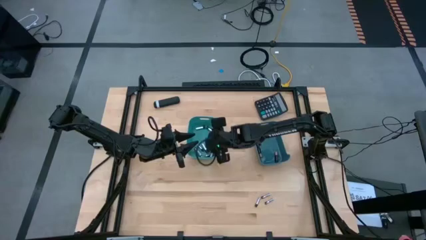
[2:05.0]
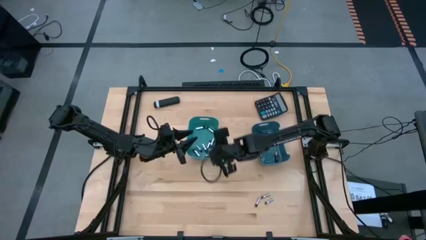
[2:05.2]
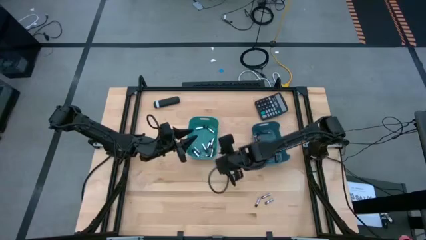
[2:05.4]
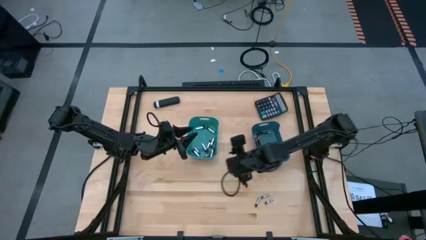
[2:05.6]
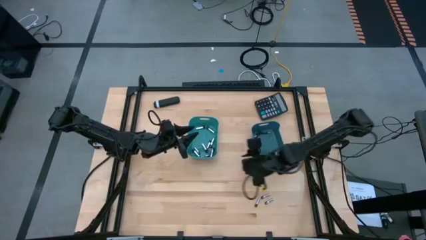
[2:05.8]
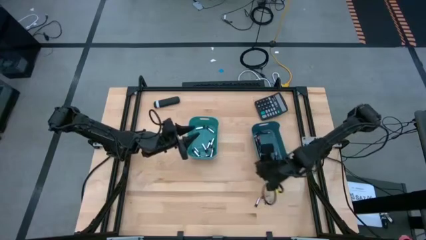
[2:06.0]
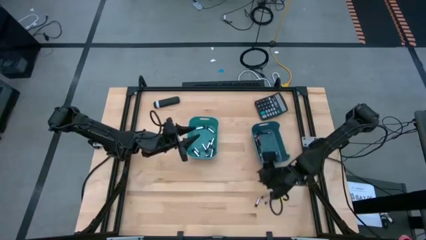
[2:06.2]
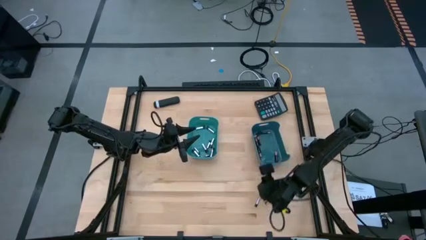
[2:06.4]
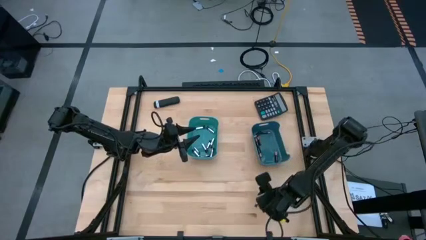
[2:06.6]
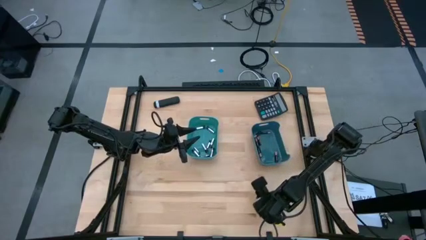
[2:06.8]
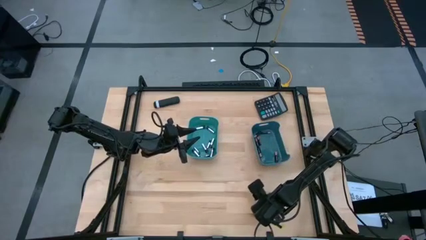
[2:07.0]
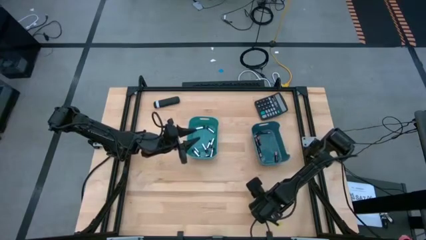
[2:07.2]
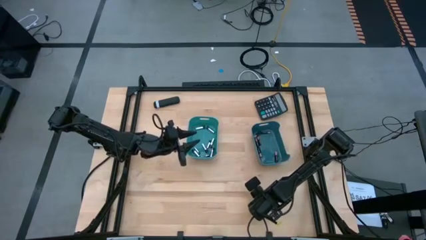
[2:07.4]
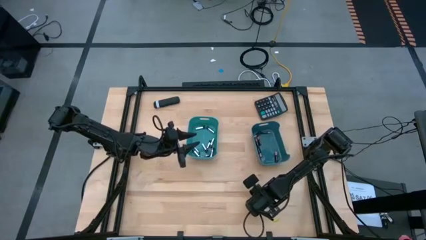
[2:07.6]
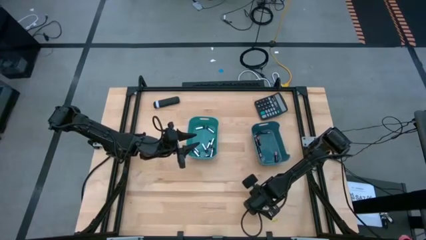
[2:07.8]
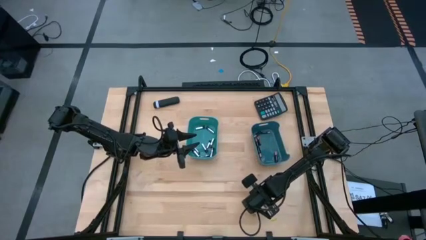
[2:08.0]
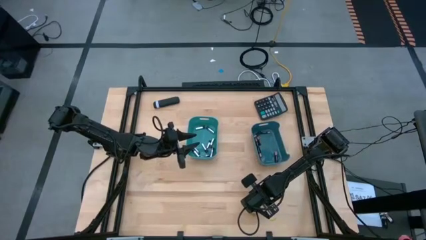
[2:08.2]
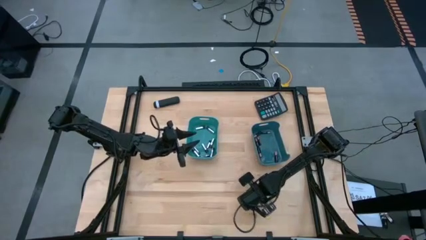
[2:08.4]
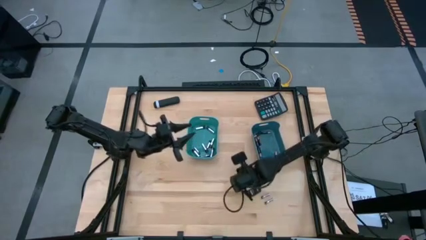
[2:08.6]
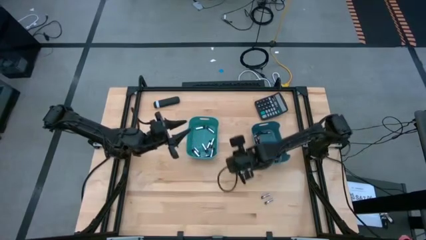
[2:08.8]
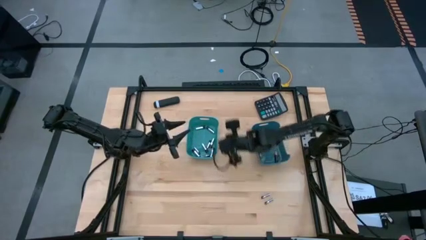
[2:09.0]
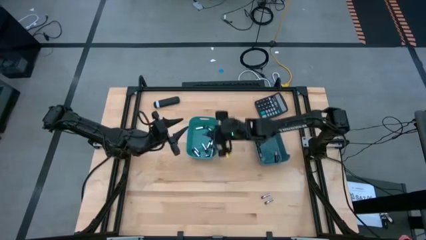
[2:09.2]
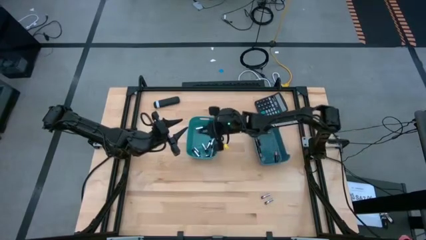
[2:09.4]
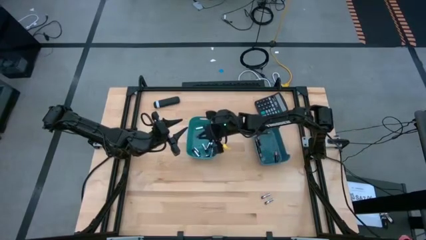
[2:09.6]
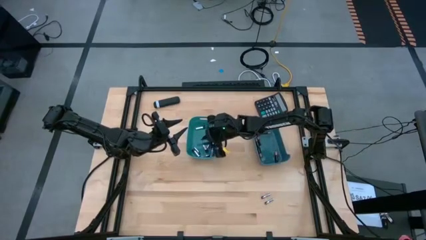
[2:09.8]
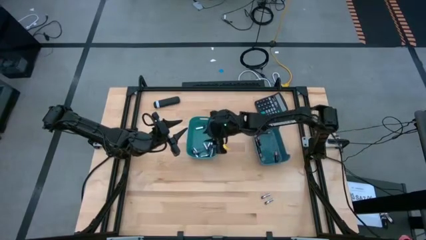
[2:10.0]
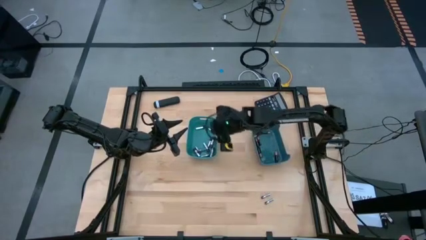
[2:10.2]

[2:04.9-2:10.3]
Task: Sort batteries
Put the silver battery into the green bin

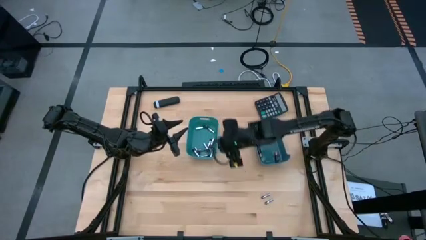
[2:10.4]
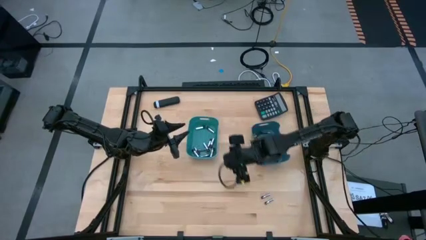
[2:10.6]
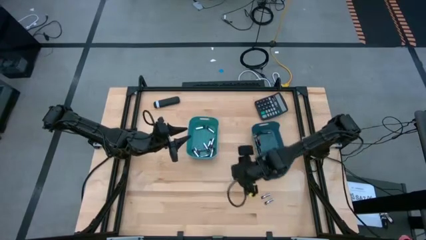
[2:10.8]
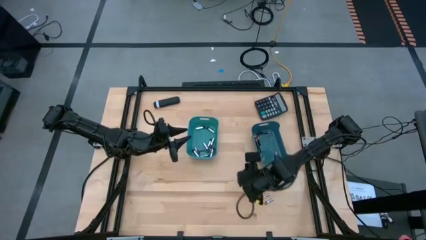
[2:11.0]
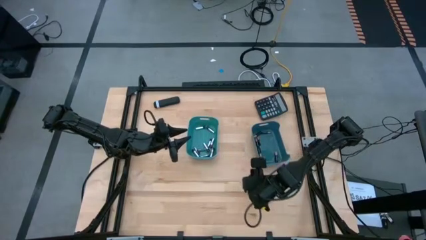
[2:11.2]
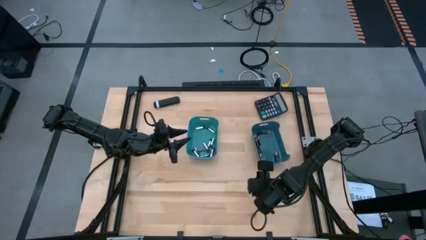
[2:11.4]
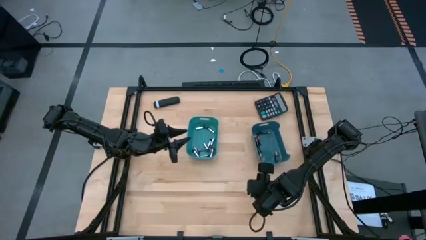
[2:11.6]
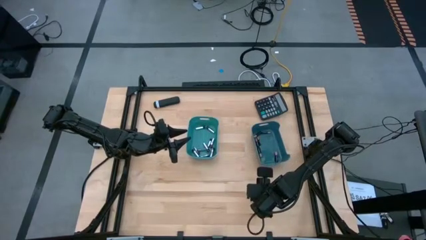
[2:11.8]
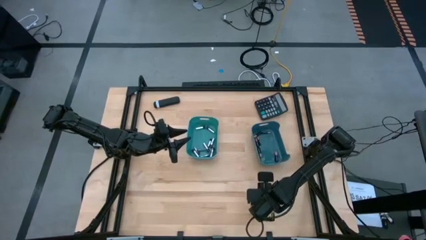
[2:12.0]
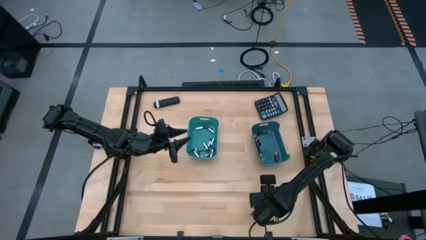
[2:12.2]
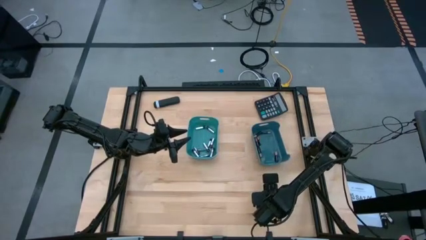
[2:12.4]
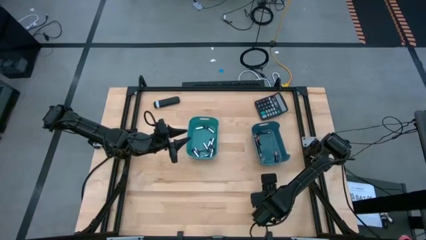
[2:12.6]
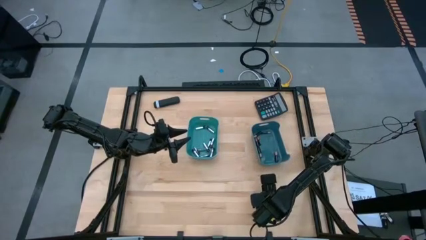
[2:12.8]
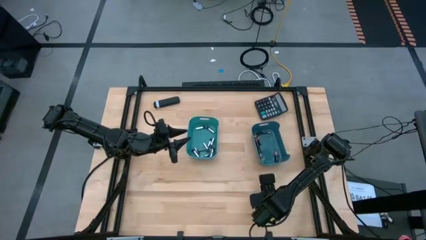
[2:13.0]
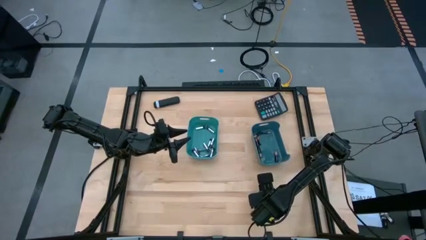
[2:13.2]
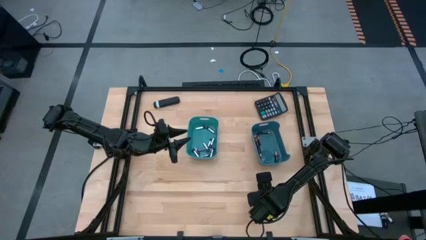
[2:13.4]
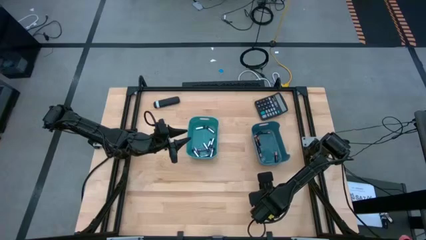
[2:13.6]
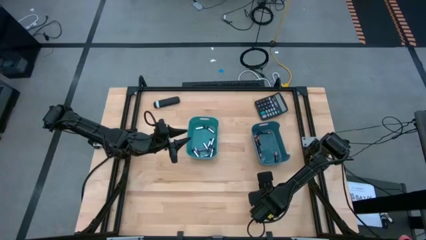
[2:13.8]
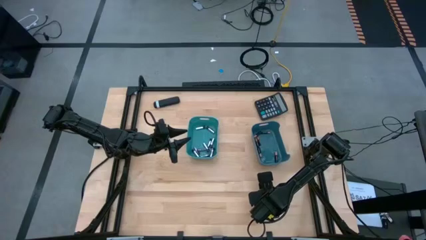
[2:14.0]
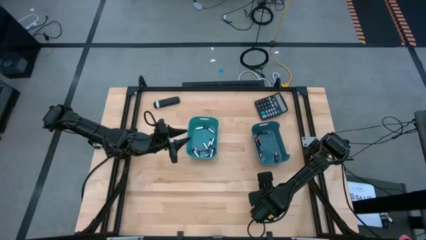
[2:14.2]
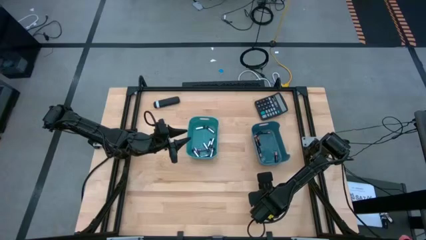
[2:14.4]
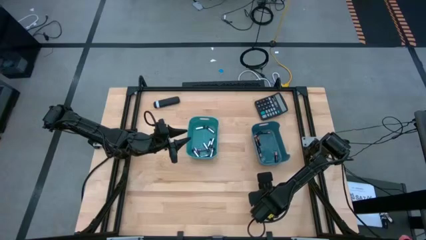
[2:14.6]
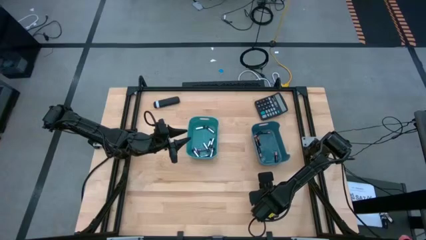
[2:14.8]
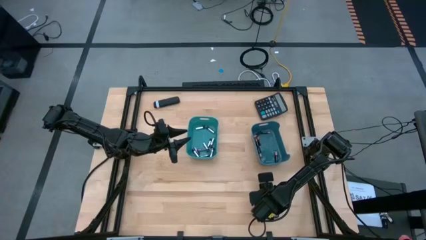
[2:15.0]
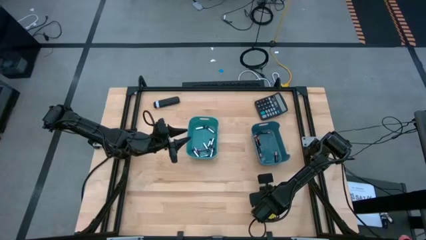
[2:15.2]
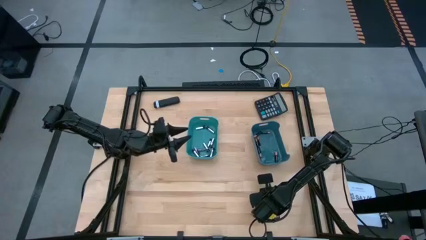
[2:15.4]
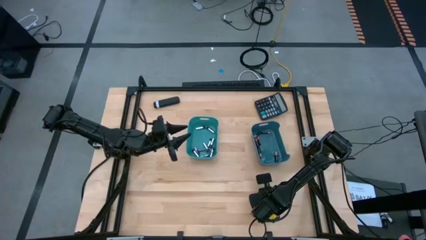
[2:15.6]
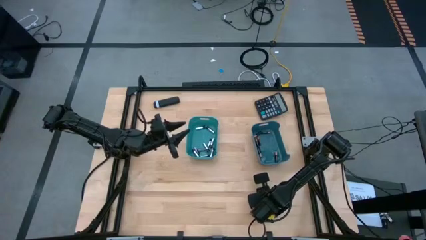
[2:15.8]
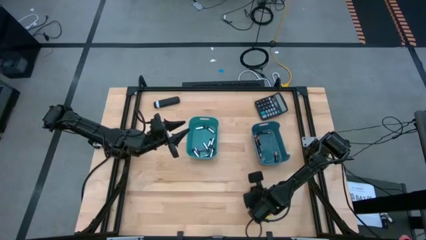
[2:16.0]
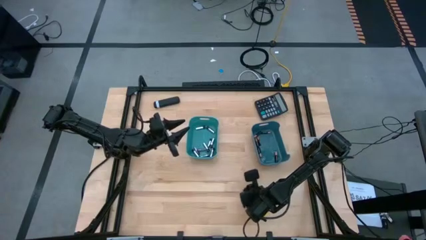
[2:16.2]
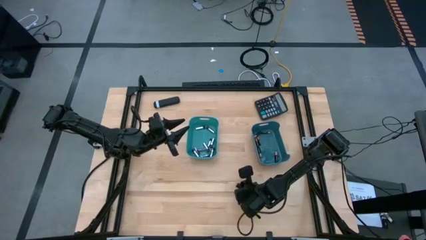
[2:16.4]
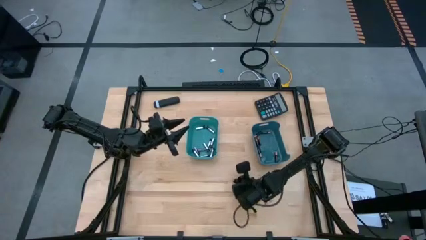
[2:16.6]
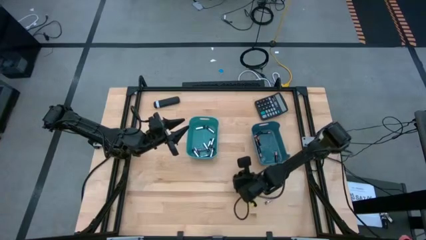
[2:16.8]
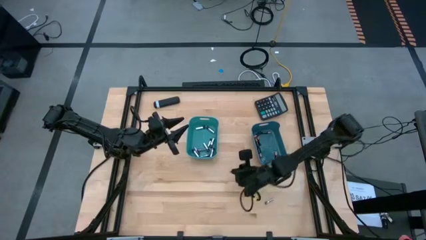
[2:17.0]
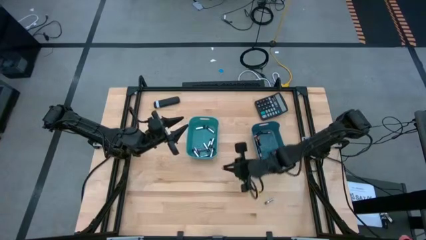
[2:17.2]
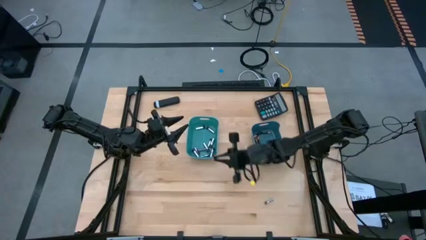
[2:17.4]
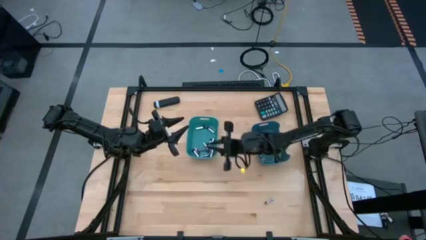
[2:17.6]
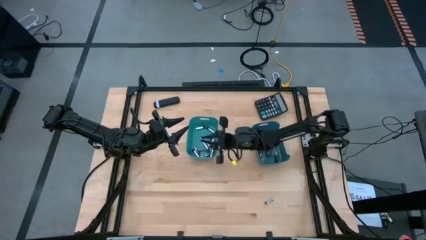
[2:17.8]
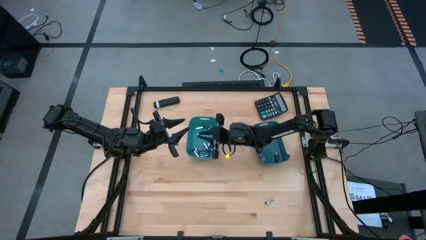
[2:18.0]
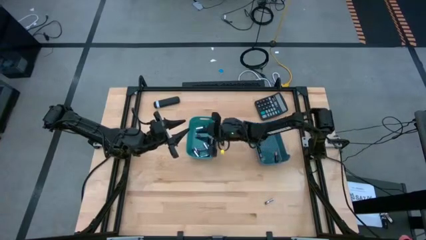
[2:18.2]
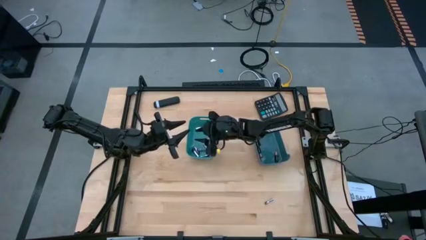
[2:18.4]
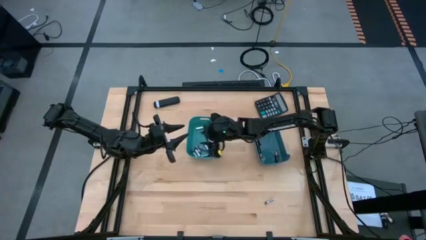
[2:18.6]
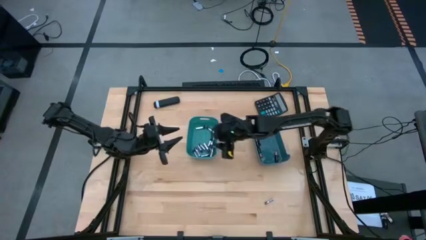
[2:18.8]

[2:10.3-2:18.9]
Put the silver battery into the green bin

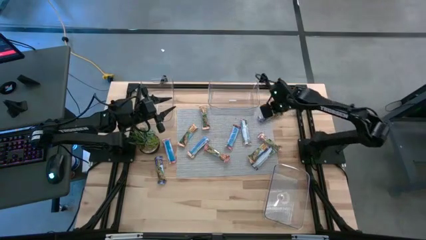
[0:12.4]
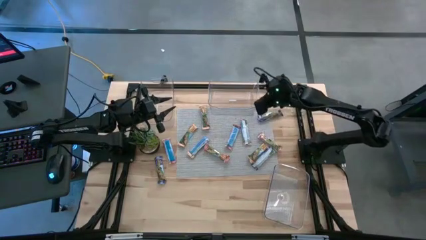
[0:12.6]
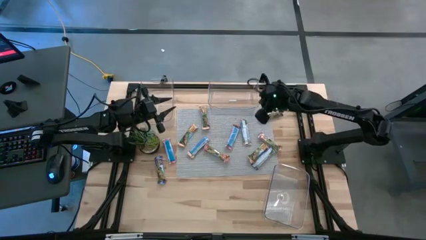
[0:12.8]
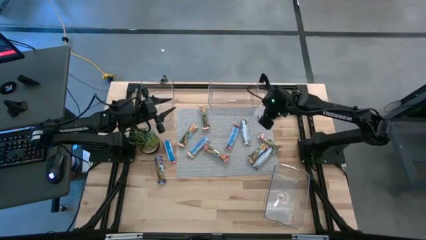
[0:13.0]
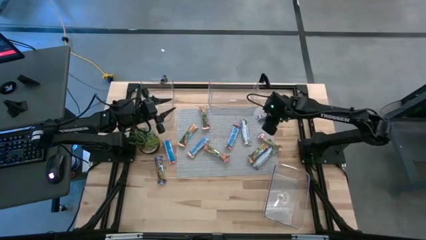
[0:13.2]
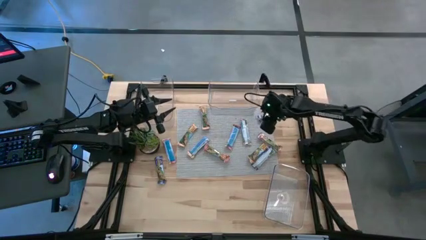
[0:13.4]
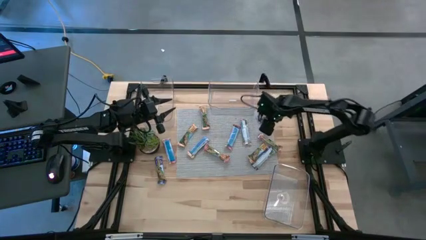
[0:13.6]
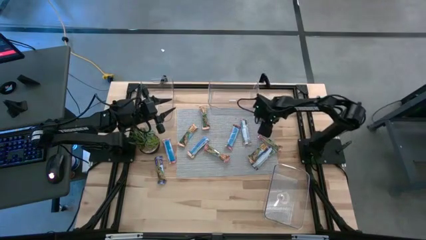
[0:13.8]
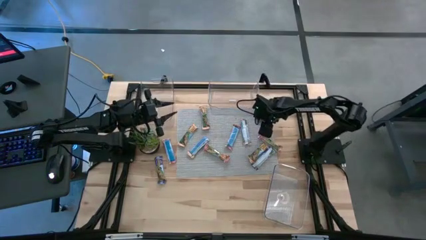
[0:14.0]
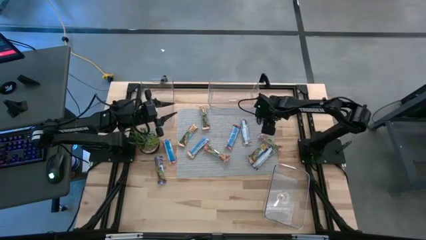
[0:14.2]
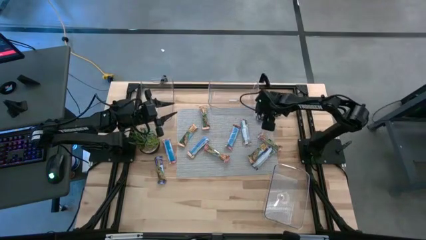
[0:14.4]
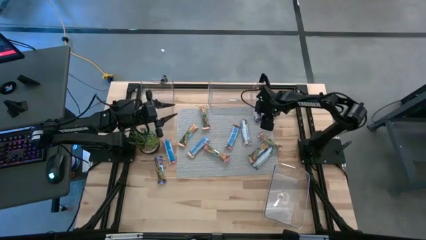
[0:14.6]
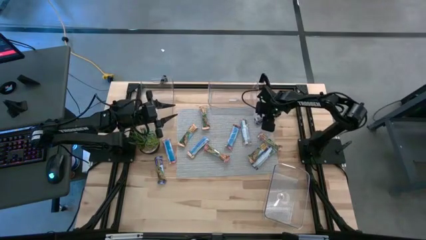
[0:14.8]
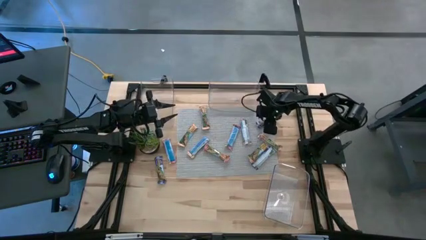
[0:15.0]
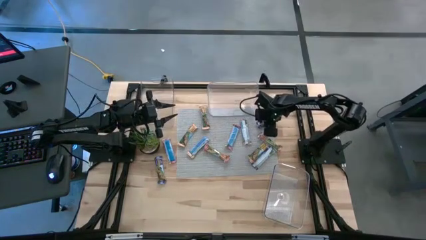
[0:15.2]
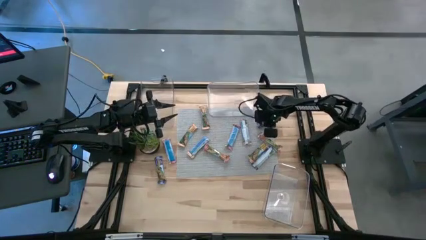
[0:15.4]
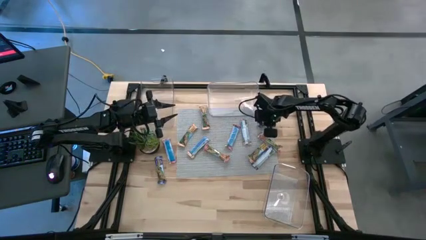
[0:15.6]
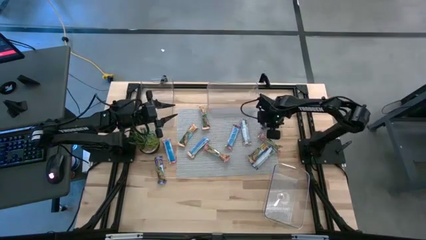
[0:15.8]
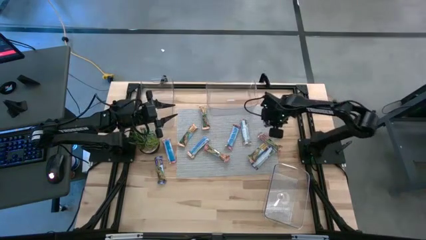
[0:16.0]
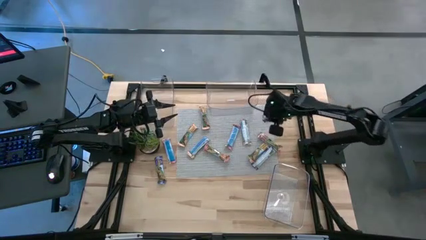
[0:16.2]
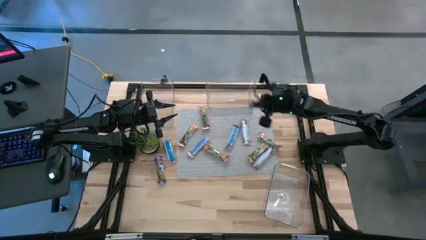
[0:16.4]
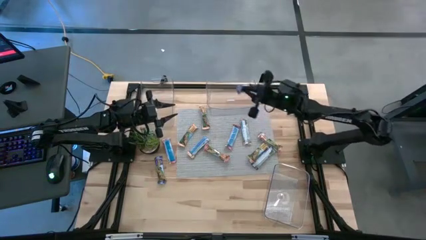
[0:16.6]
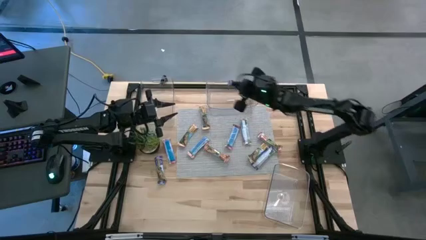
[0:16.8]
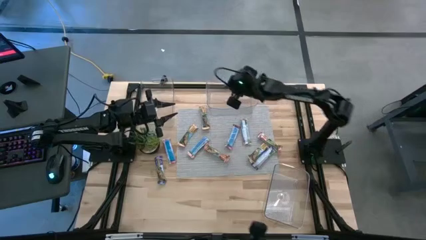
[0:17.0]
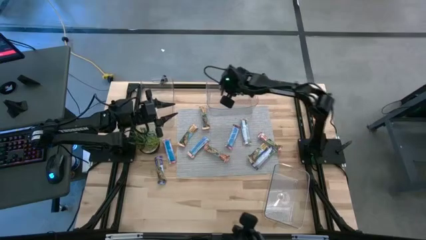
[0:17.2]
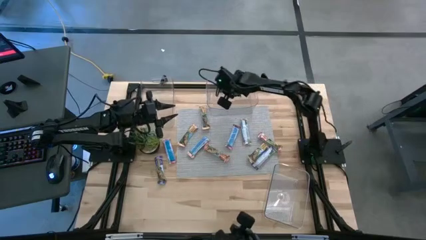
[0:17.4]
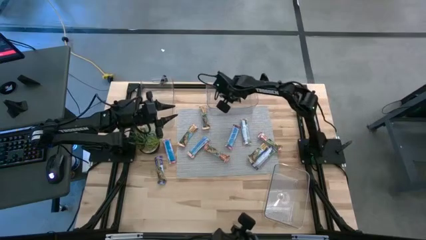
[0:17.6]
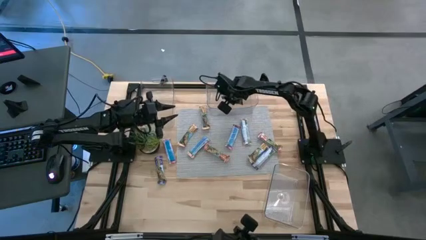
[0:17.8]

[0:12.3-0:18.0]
Task: Pick and place Granola Bars by type
Put the blue granola bar into the right transparent bin
